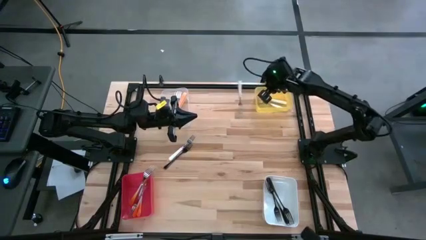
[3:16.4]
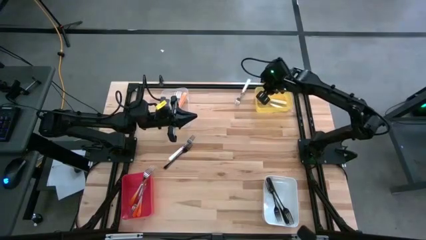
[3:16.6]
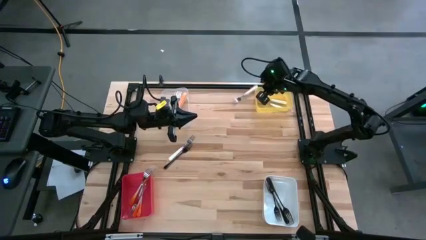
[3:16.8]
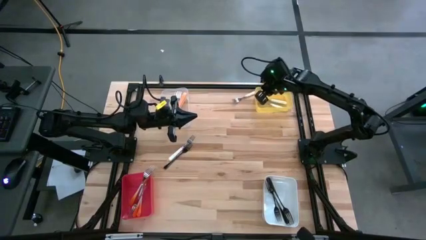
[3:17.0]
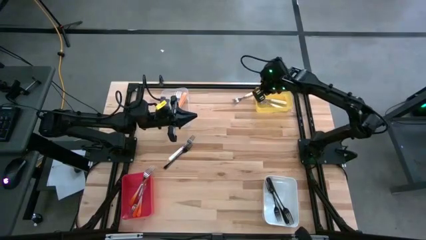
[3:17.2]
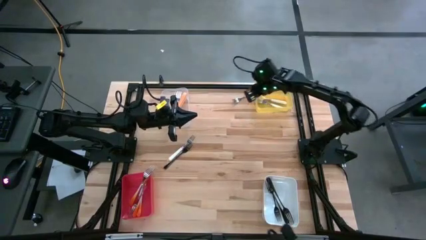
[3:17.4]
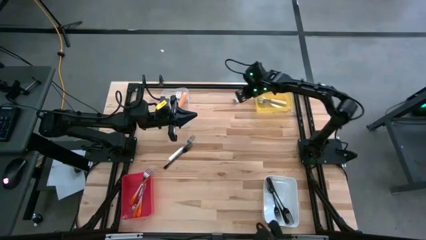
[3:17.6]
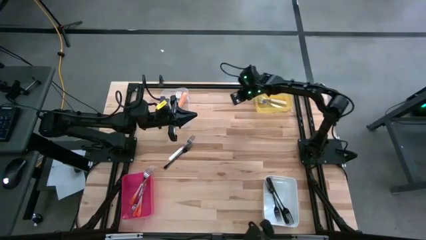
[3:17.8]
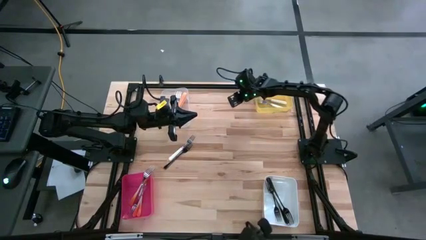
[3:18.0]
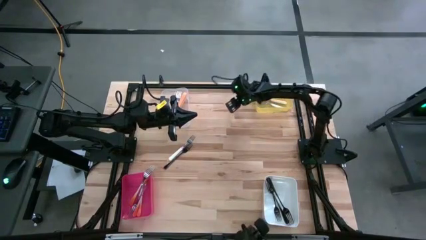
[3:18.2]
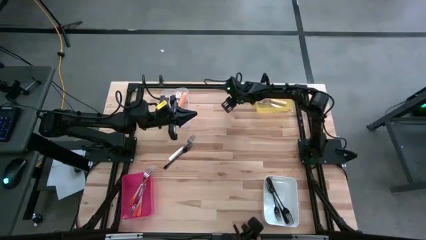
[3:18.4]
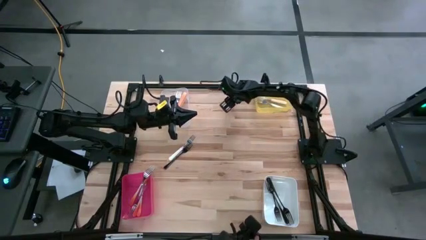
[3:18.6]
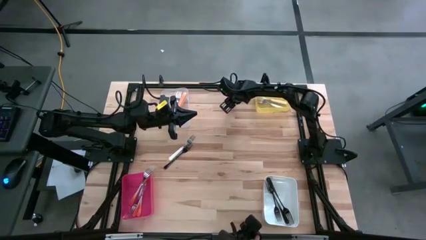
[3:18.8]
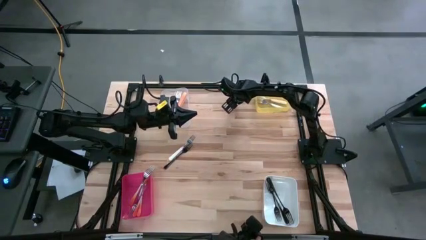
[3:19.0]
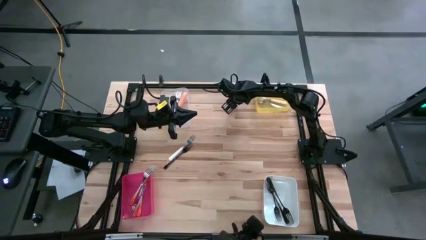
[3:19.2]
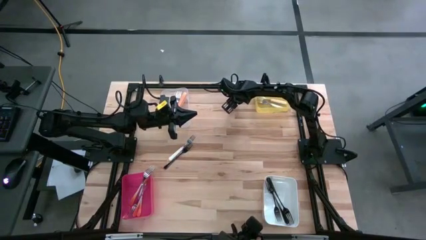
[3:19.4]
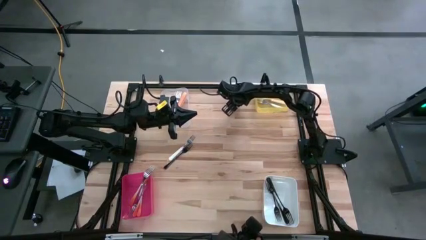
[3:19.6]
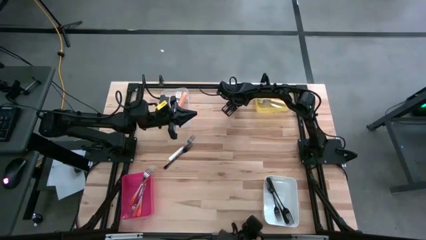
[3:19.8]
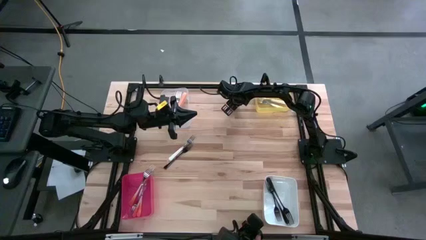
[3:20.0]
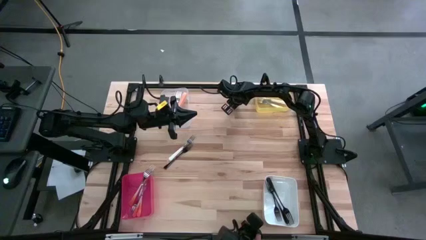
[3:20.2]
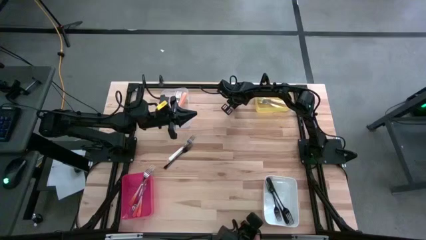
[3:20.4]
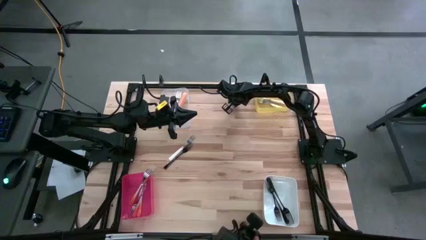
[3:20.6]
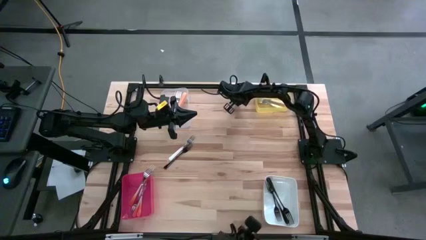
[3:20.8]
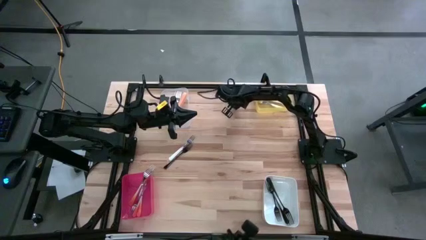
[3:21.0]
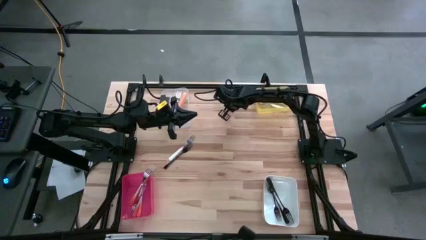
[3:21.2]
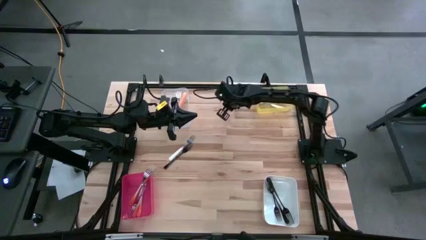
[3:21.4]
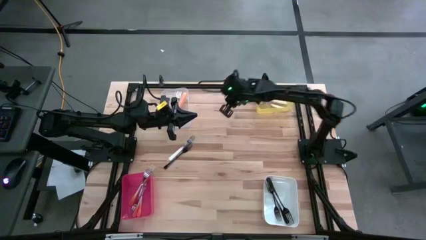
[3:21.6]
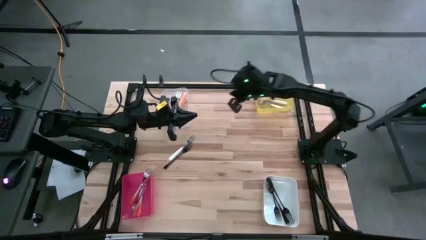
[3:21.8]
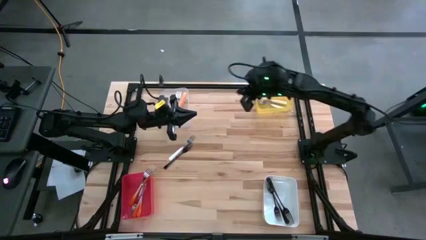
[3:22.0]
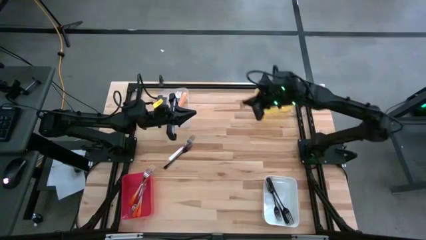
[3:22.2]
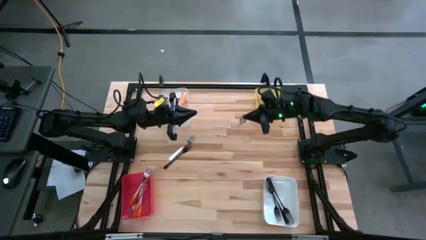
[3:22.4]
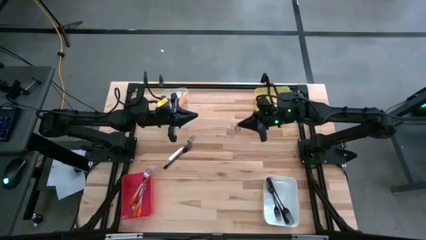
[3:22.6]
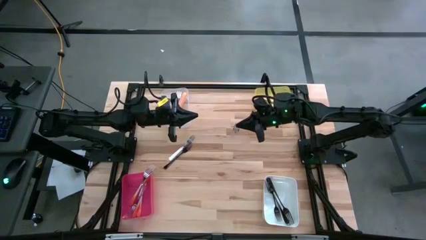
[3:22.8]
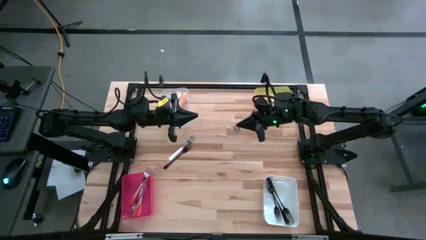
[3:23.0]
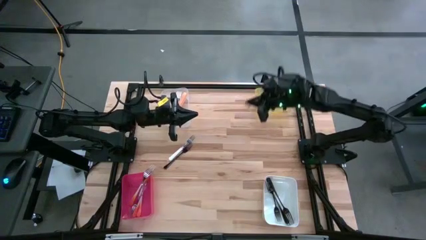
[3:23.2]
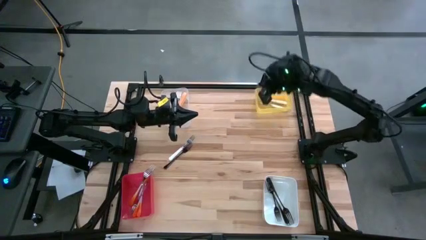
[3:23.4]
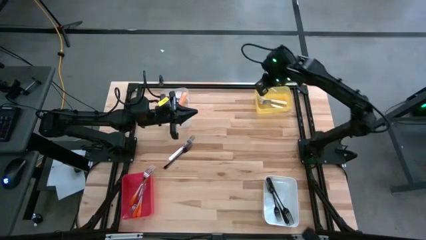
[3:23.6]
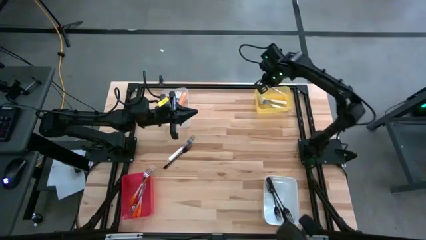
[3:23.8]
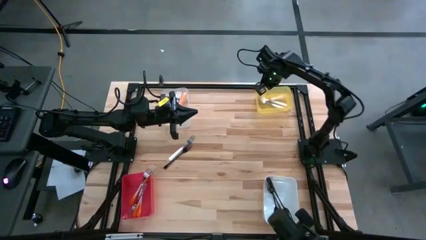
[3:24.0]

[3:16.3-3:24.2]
Task: Sort silverware by color (type)
Put the white fork into the yellow bin

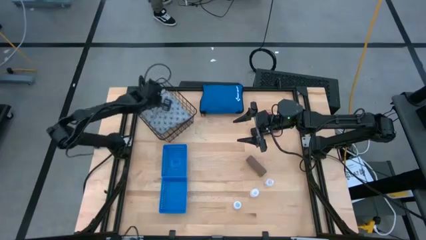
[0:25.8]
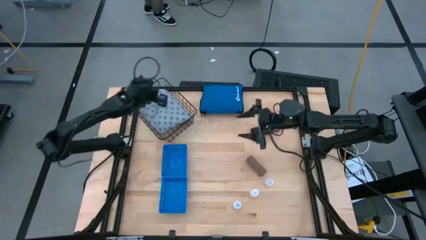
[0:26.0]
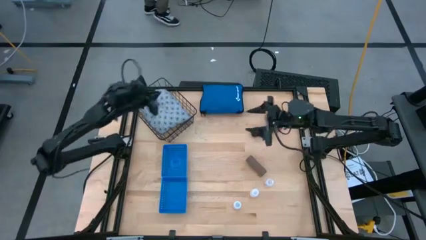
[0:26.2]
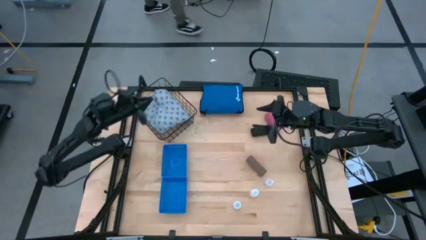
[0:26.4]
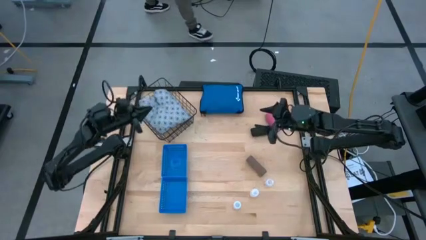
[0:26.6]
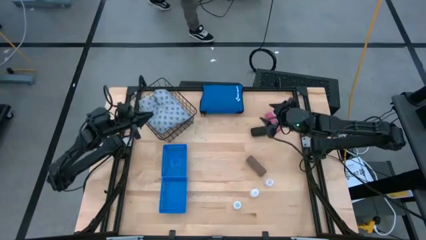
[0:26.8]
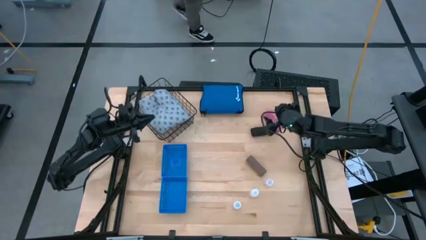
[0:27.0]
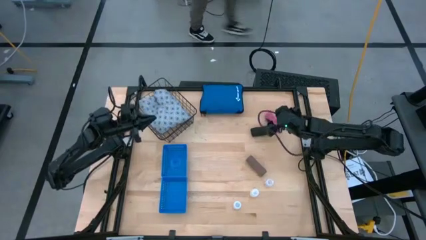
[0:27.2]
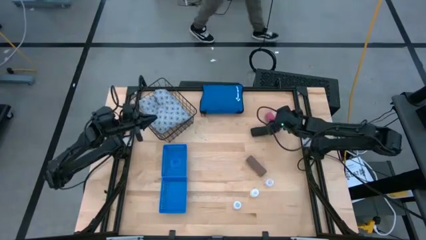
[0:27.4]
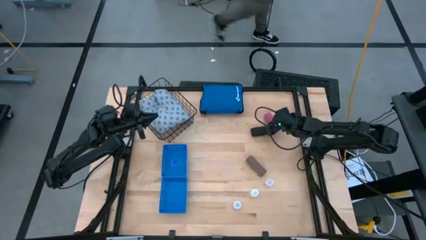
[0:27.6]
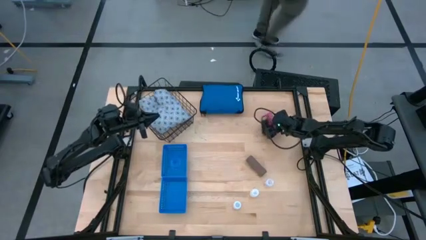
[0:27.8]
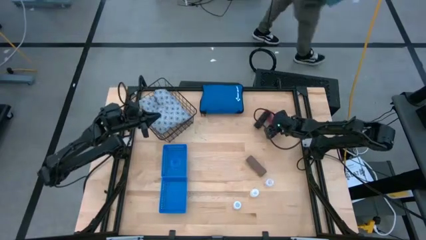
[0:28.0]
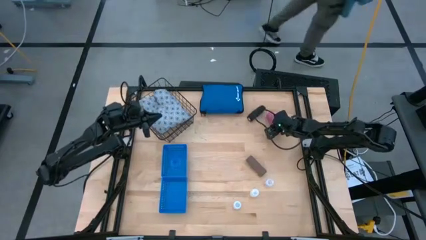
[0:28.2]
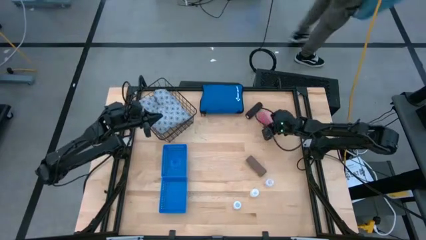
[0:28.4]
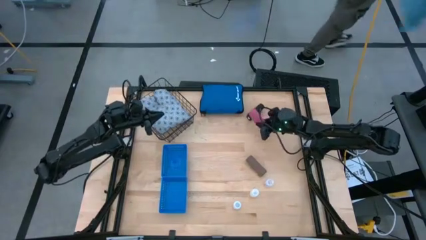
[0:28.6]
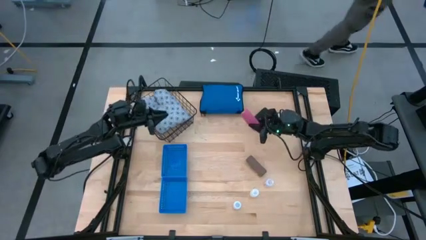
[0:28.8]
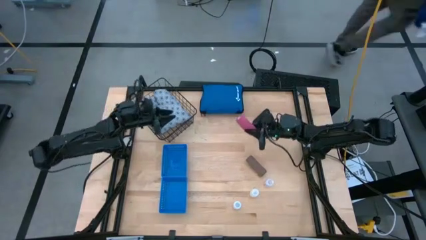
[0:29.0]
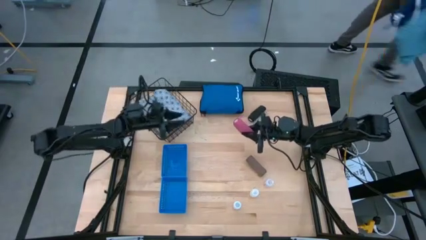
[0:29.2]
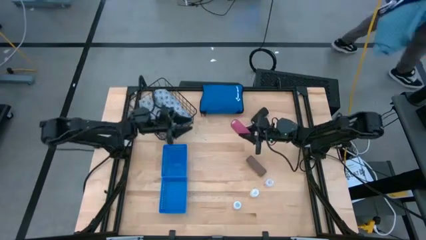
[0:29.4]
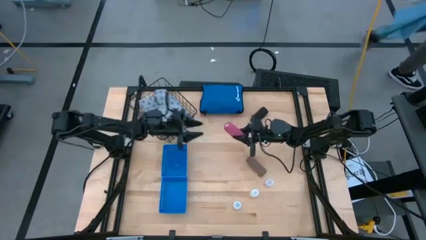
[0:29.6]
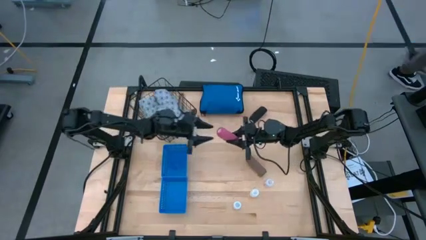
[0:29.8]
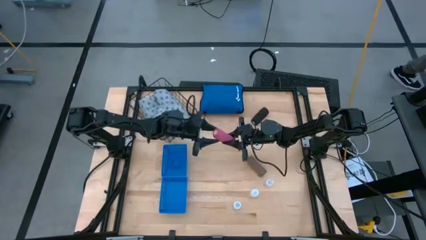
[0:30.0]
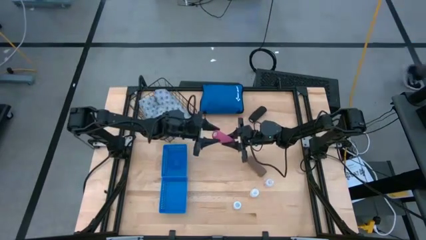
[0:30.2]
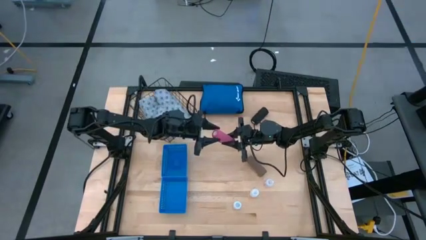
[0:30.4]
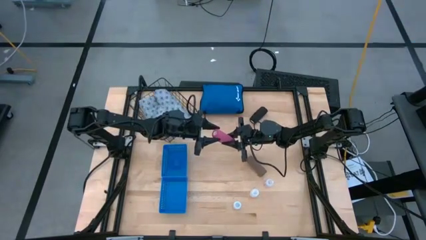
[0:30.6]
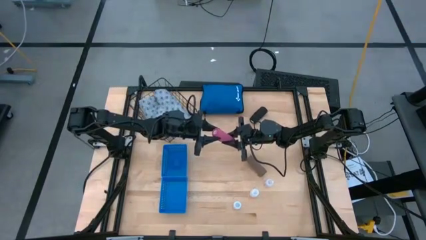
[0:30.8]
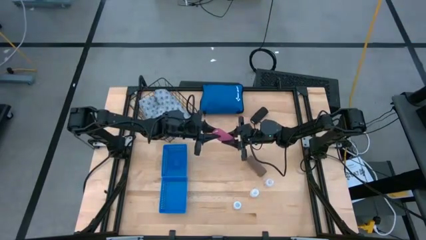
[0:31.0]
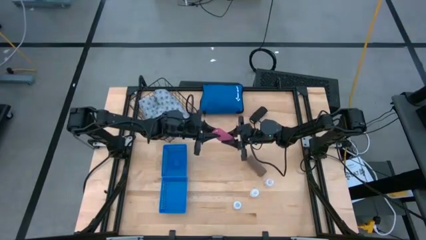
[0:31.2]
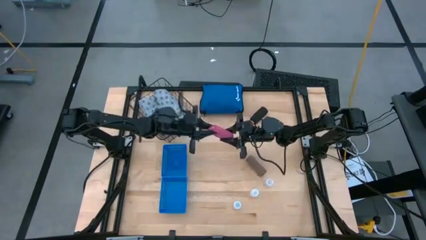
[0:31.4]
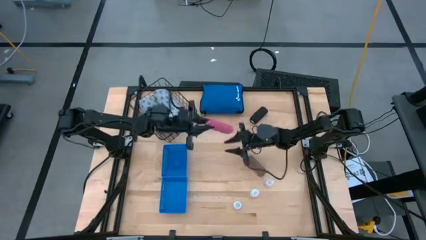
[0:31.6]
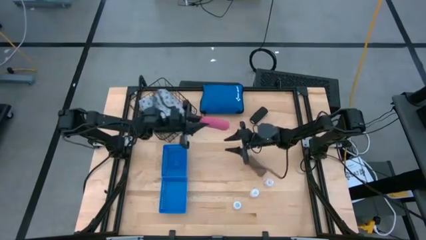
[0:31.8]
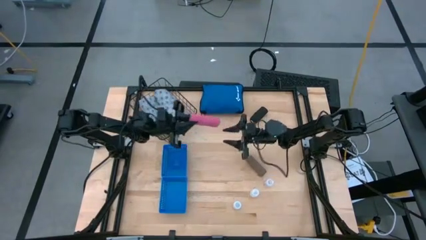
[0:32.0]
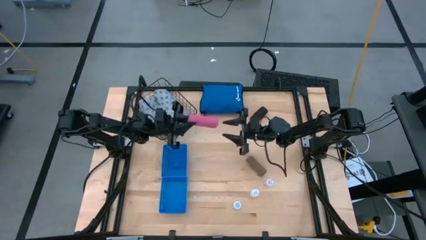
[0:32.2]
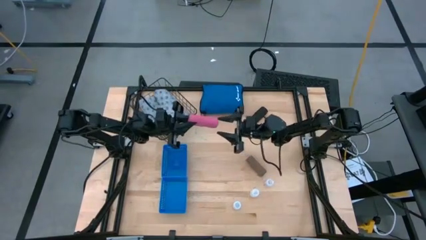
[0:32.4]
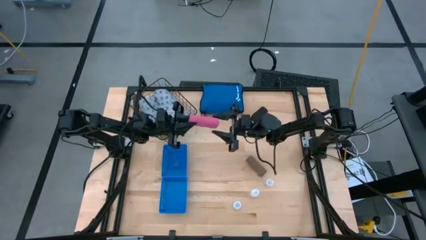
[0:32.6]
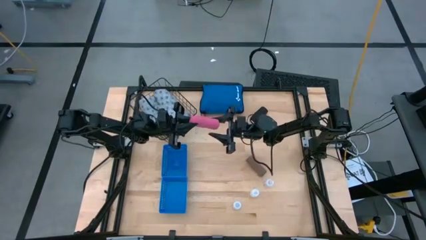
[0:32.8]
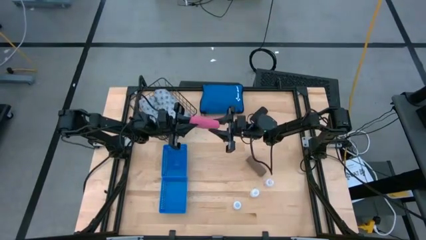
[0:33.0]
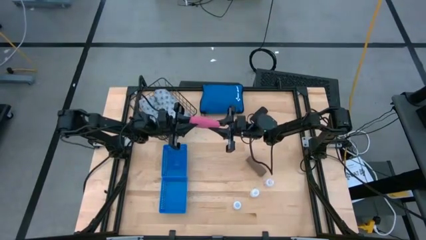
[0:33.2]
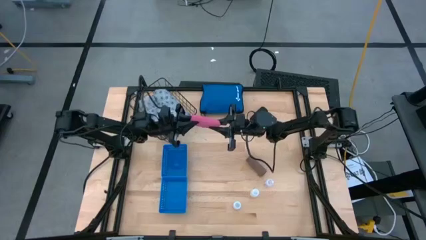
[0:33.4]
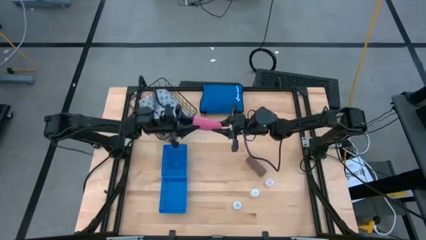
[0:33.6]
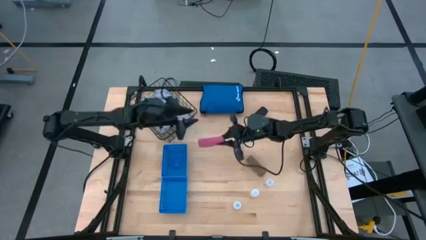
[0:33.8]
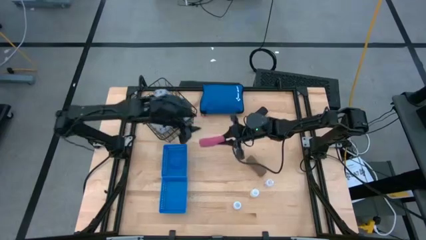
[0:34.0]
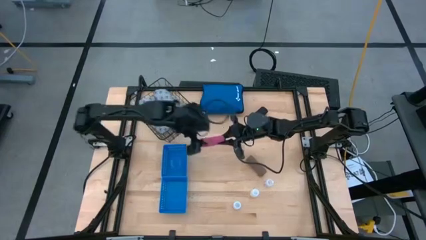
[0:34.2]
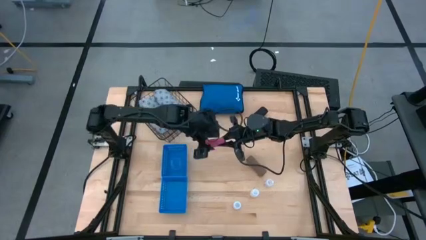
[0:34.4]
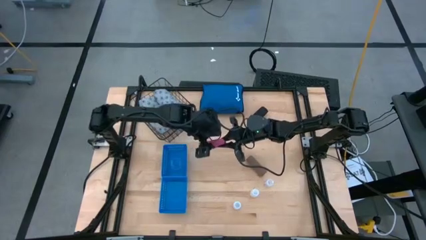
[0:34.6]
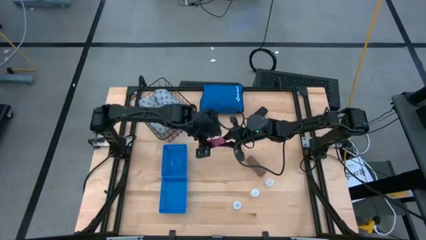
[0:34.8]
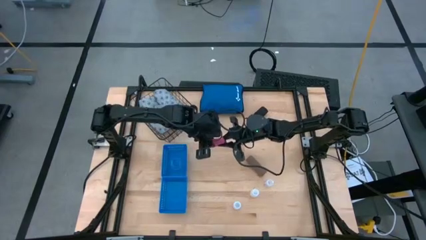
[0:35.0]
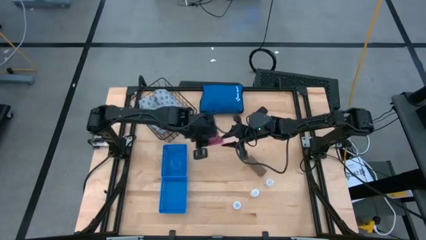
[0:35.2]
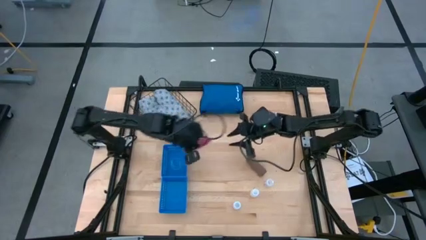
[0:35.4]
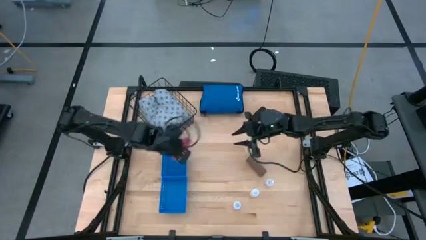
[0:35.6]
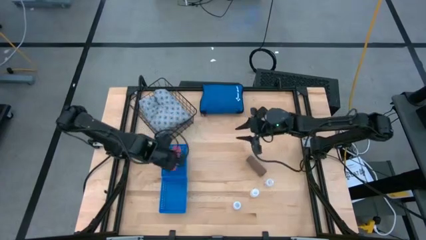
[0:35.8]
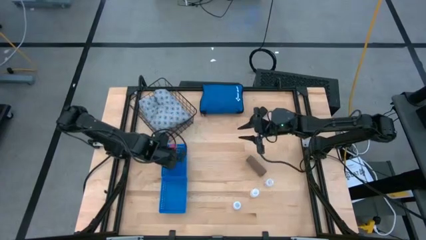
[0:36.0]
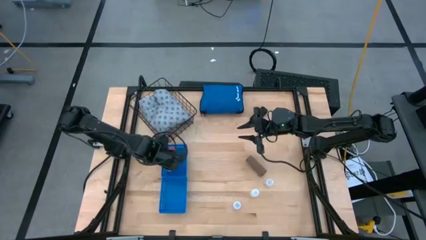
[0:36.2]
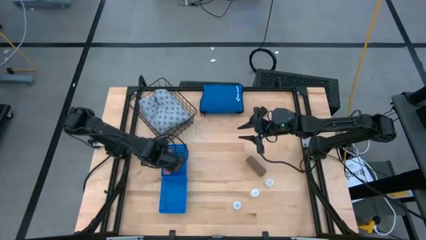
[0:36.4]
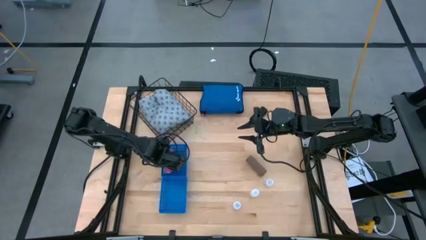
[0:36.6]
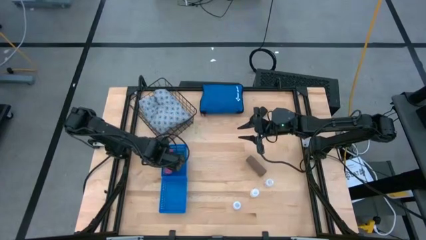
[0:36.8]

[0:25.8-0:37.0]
Task: Pick & place medical supplies in basket/bin
Put the pink bandage into the top blue bin
